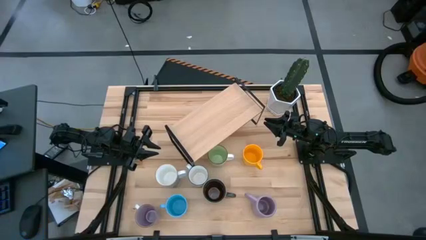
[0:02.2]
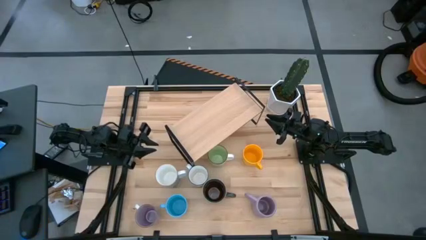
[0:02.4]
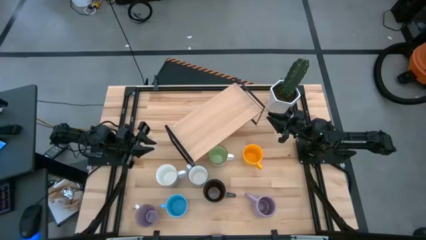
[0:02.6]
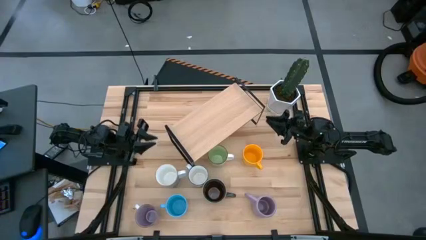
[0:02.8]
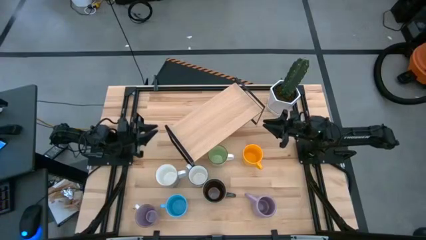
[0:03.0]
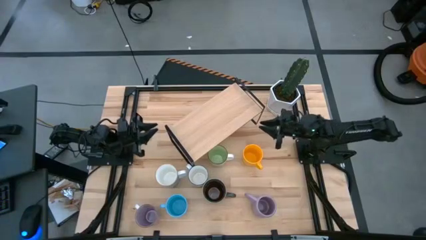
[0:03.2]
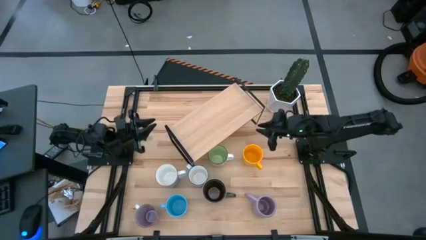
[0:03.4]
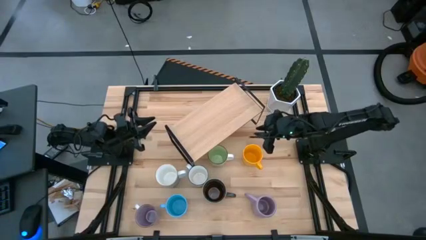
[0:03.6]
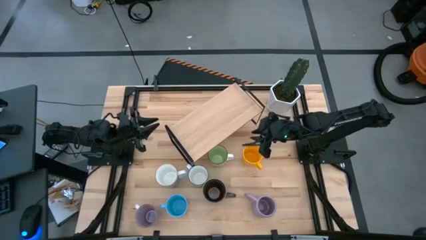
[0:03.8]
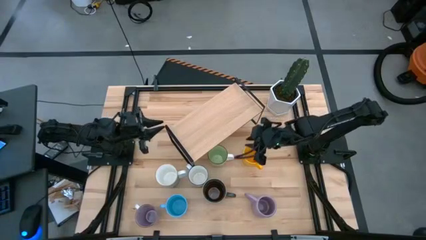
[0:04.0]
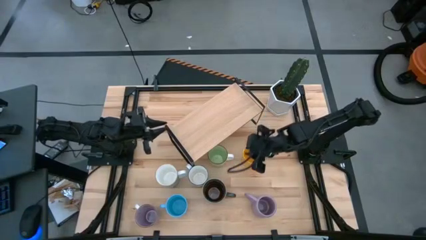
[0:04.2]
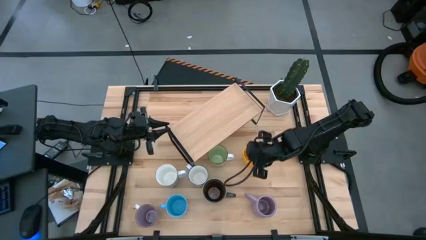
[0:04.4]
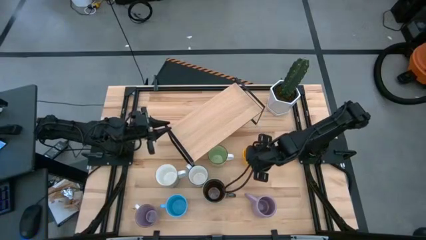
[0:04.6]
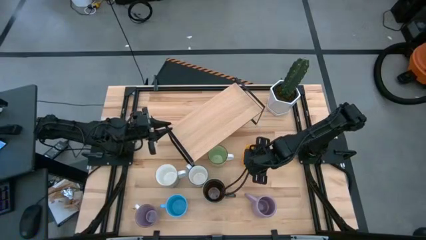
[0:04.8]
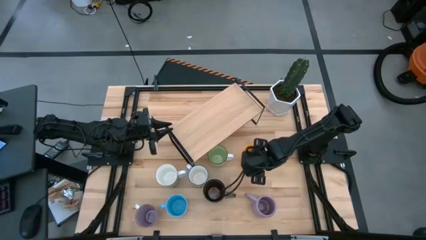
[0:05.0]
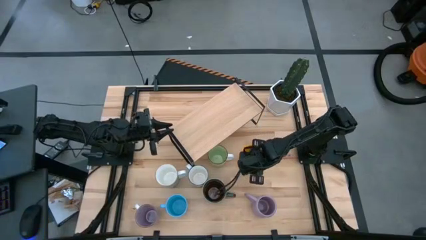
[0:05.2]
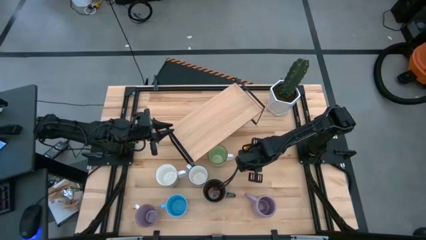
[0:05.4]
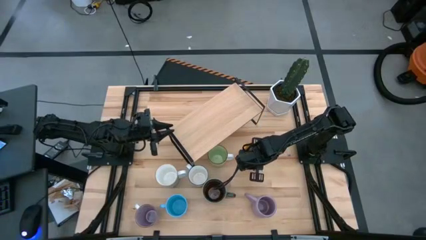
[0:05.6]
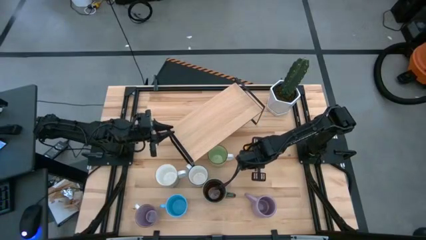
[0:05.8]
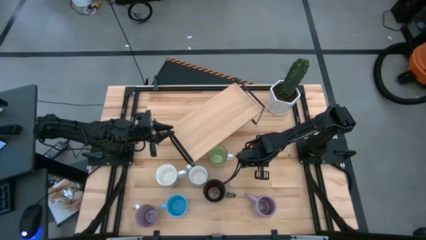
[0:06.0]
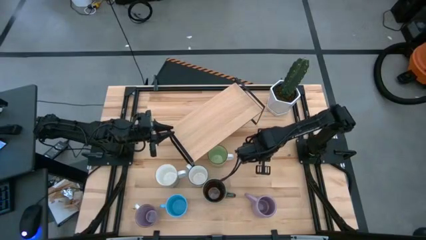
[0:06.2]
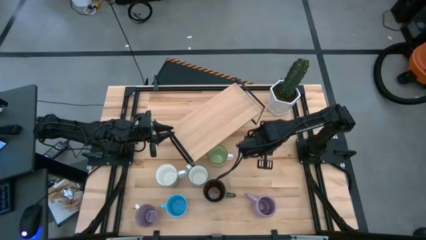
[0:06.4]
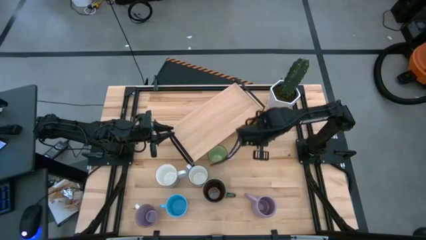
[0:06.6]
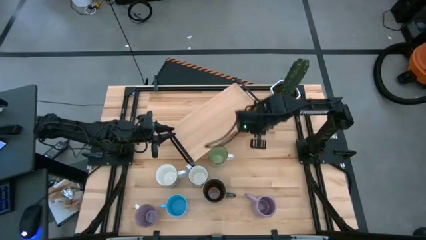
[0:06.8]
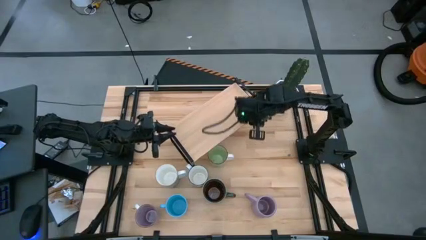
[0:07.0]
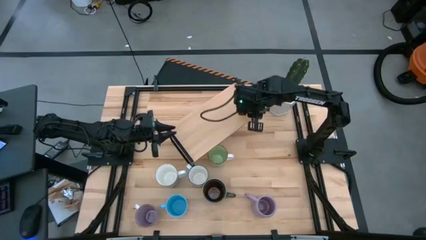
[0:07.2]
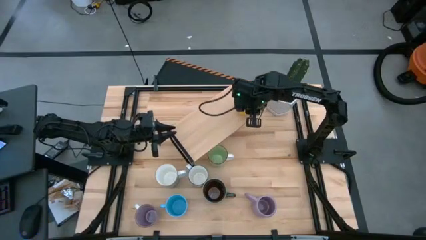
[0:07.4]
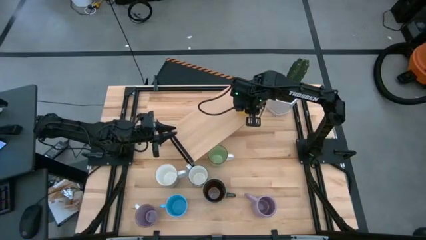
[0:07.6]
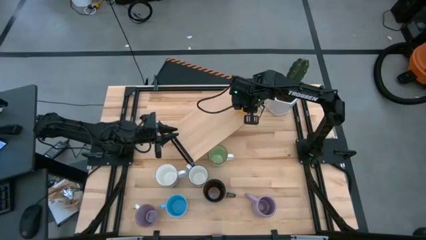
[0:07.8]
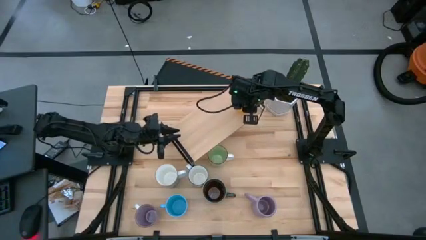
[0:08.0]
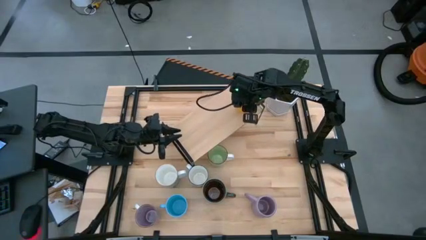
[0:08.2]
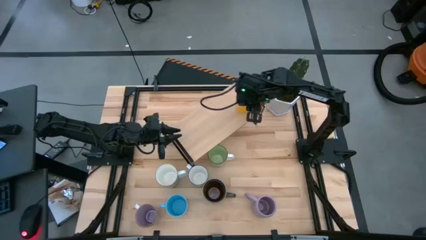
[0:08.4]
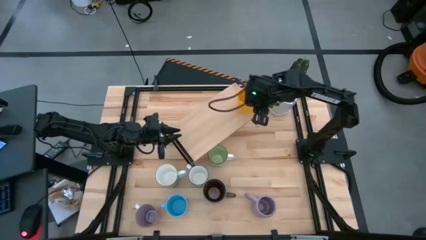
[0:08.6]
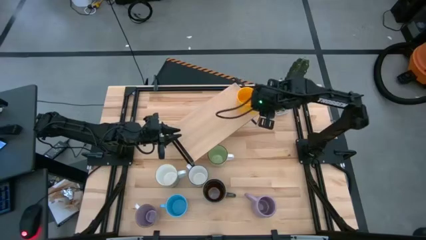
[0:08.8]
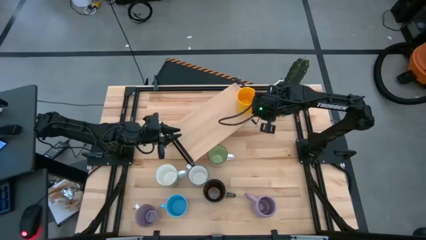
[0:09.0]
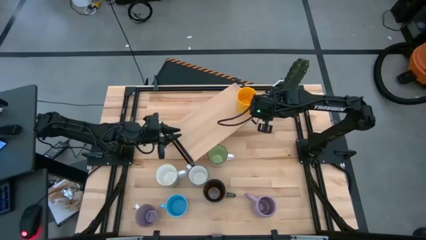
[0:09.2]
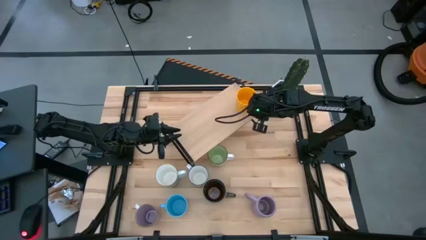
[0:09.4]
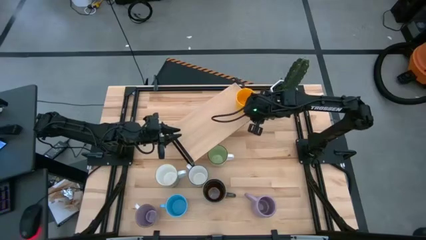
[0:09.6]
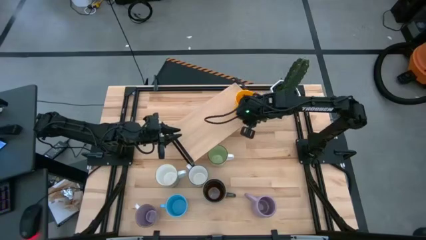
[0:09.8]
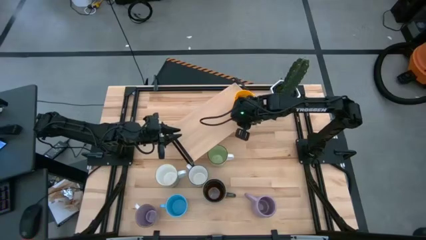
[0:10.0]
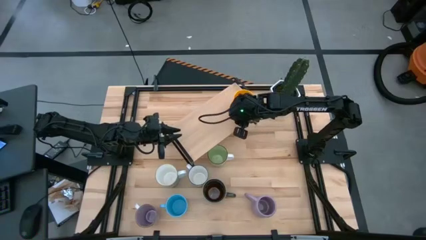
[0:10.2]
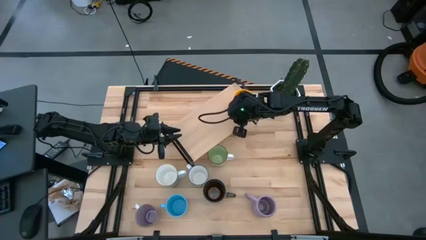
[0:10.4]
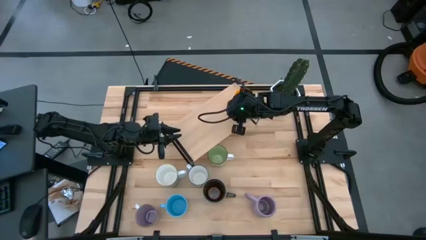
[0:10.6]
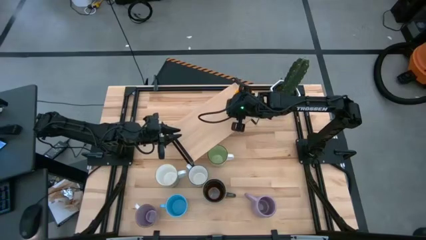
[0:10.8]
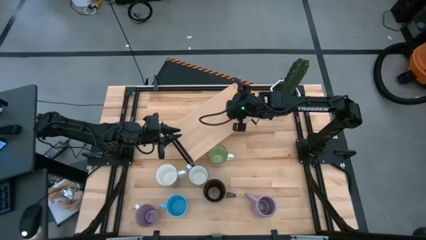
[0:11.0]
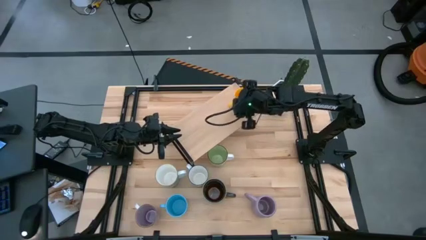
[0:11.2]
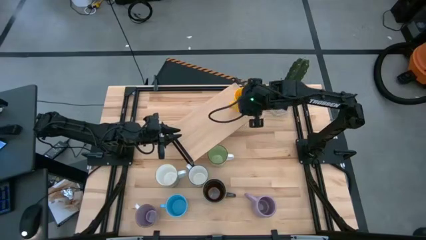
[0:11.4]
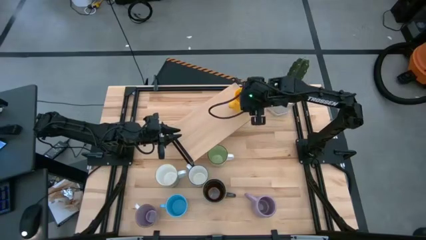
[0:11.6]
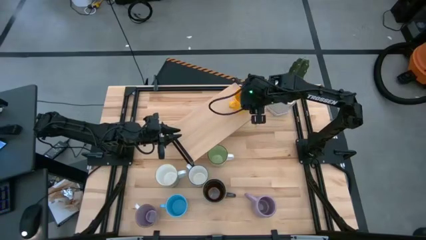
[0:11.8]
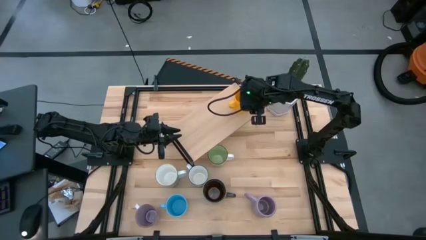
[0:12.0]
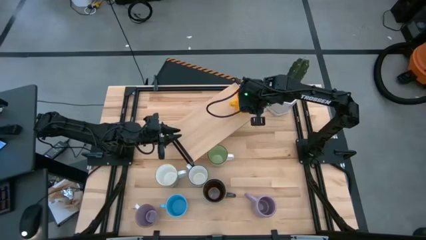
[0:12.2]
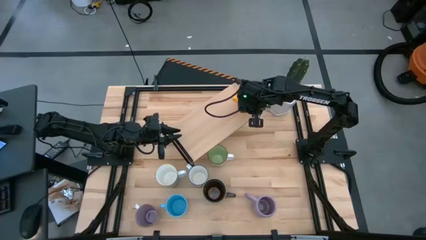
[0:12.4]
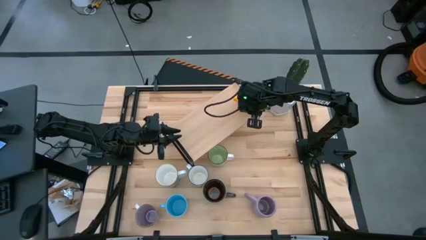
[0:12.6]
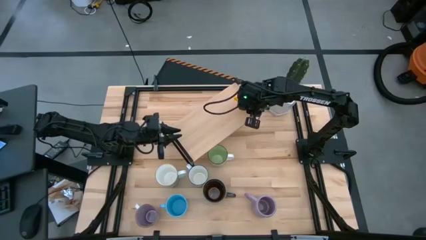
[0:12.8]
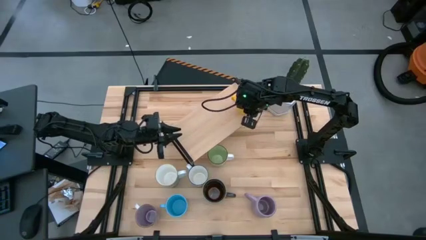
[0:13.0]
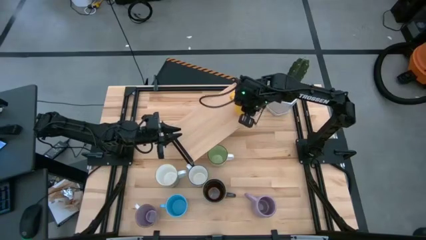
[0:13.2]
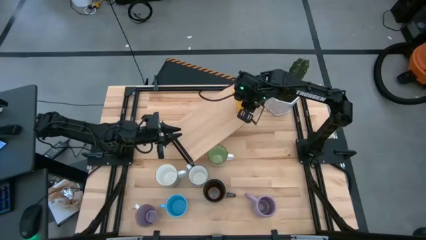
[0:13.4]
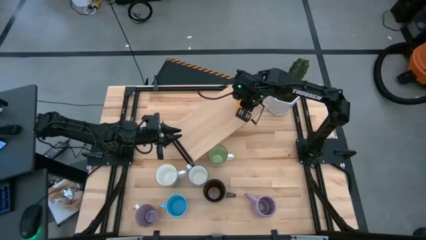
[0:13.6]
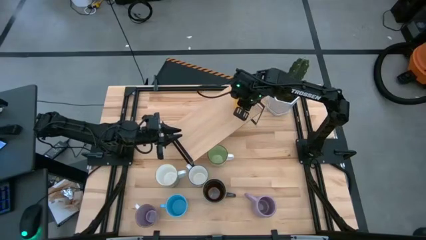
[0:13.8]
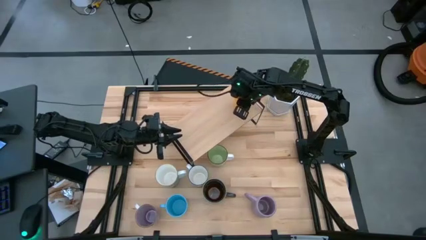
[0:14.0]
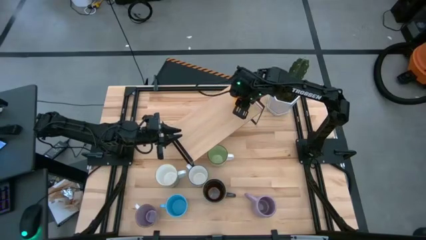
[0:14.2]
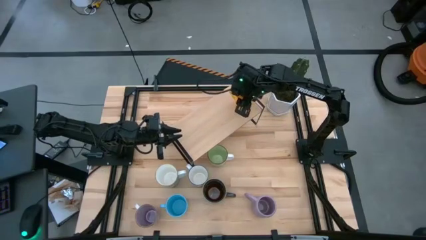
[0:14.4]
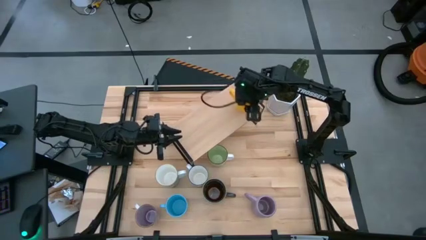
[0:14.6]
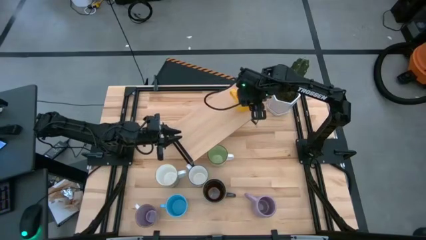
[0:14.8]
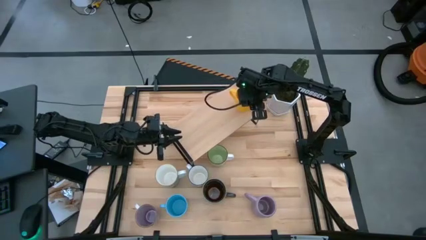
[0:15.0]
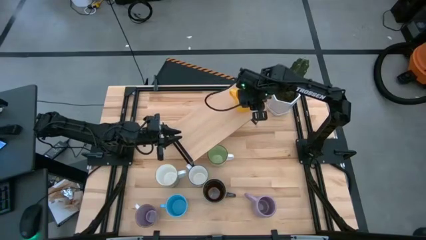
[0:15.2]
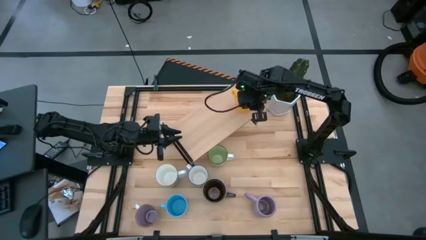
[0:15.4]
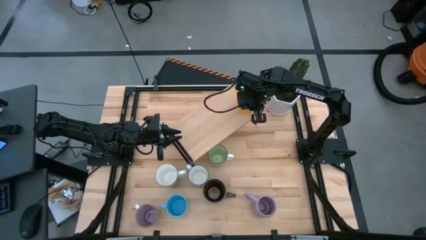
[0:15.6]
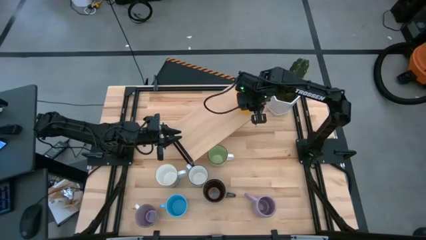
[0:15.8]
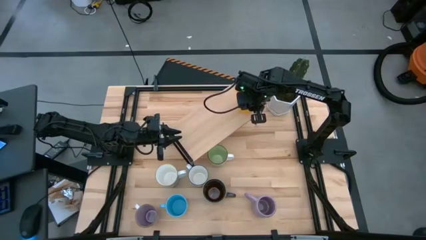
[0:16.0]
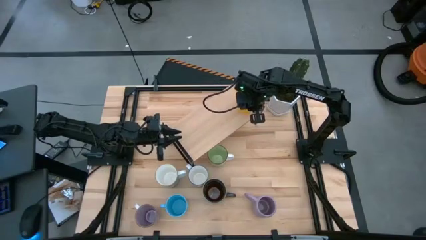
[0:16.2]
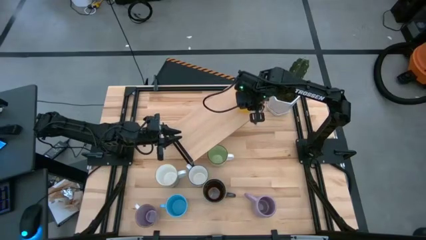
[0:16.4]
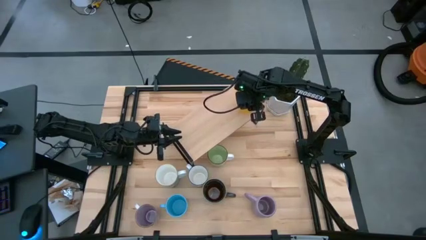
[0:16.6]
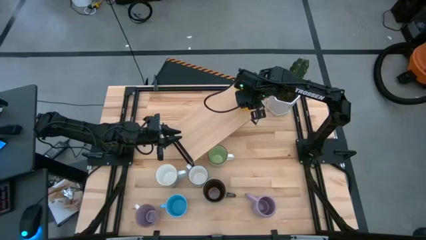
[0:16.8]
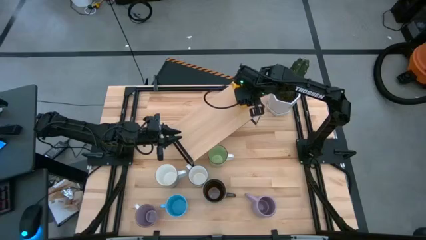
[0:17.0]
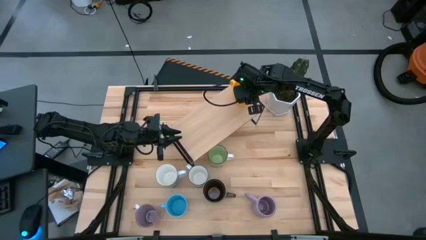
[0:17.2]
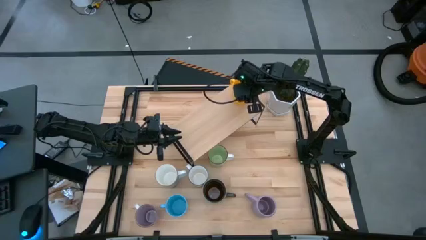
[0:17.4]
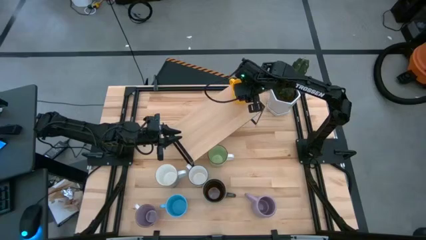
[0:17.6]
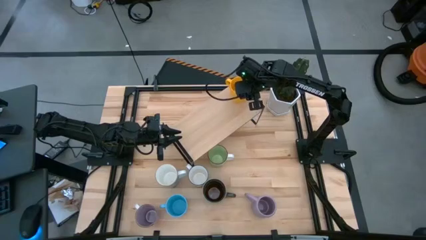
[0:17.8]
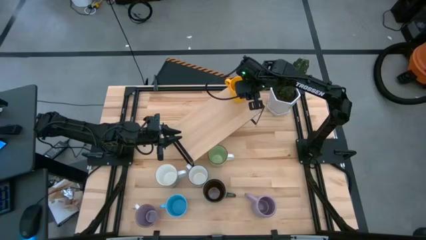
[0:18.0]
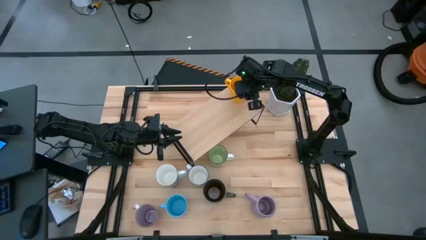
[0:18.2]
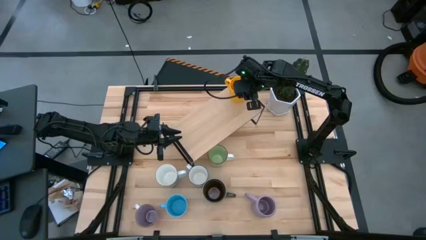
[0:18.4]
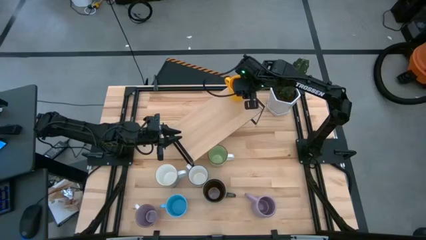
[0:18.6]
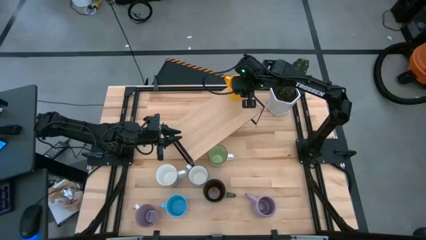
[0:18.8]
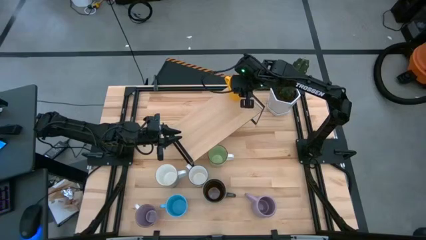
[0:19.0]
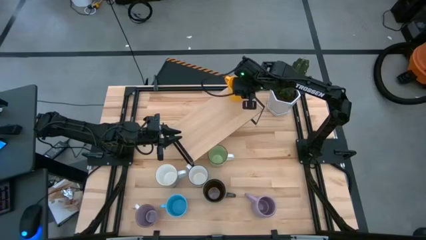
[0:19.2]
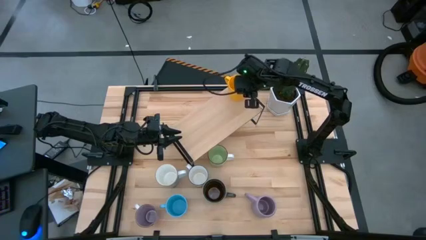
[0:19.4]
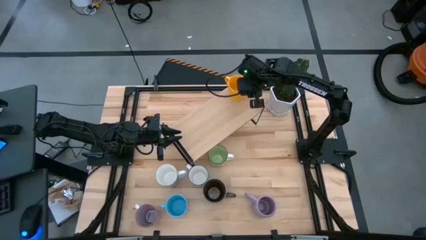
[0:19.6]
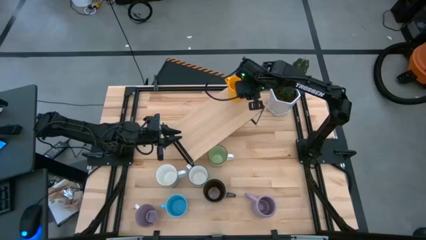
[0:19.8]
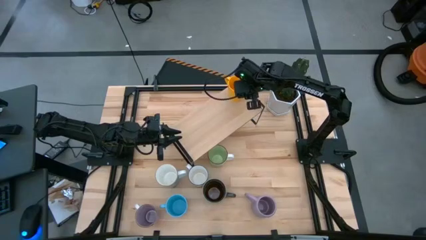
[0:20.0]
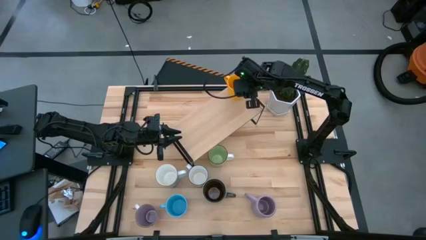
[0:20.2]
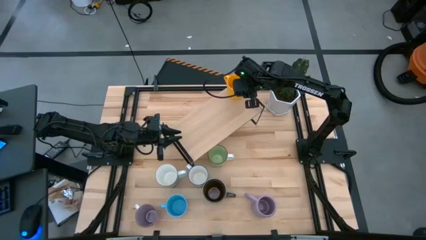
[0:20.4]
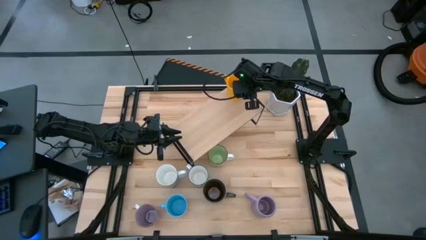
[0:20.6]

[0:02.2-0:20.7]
Task: Place coffee mugs
Put the yellow mug on the shelf
